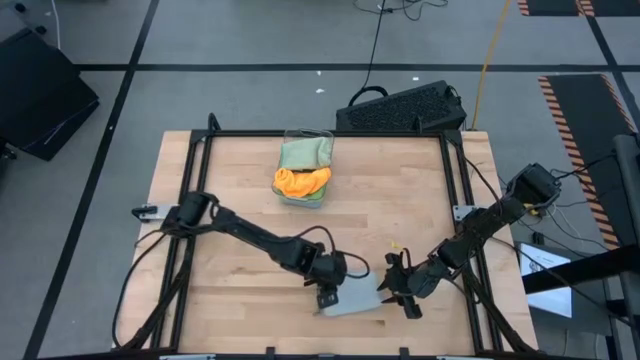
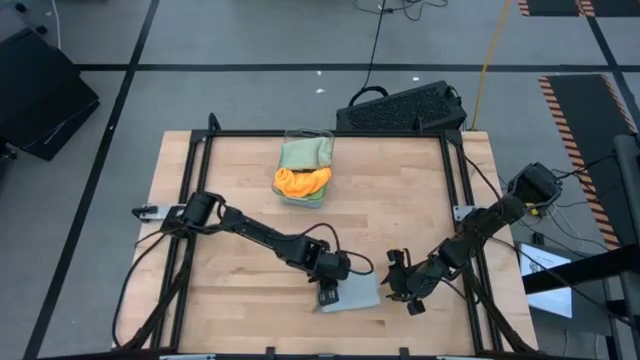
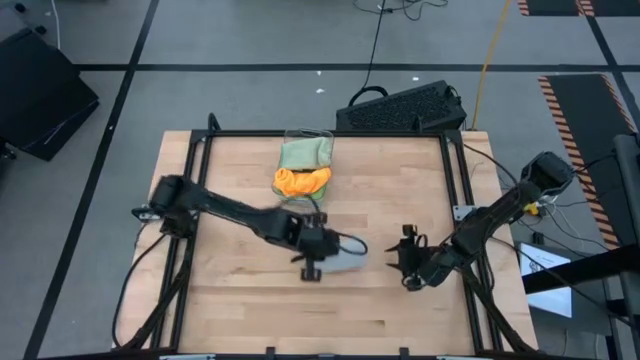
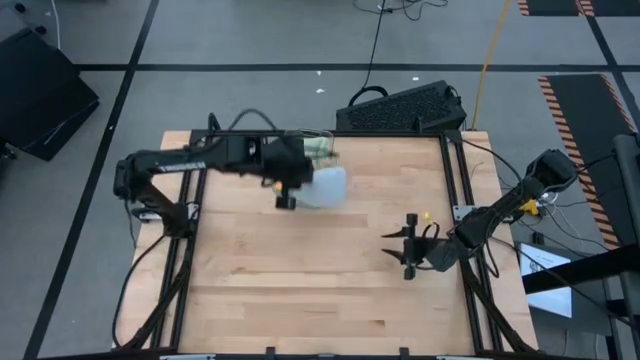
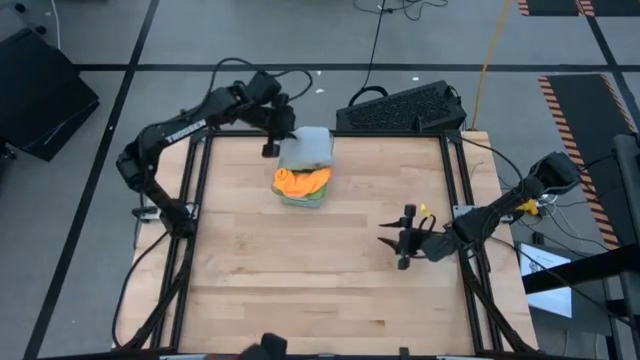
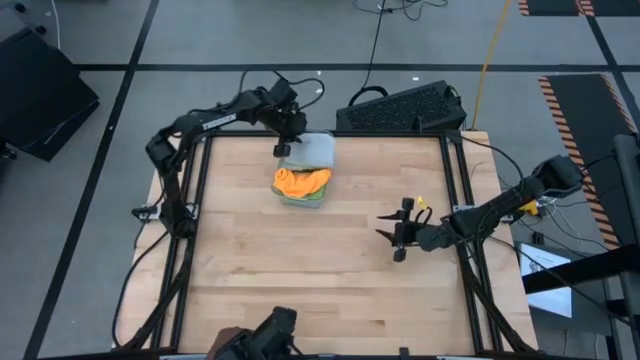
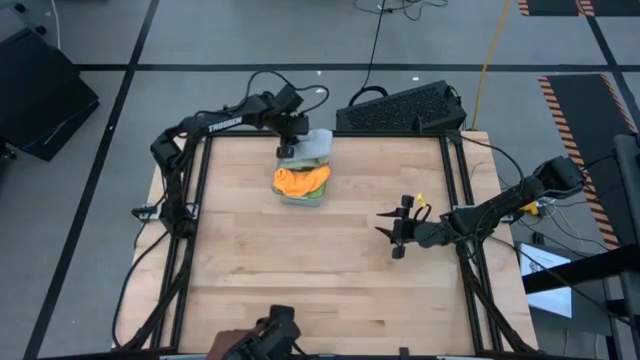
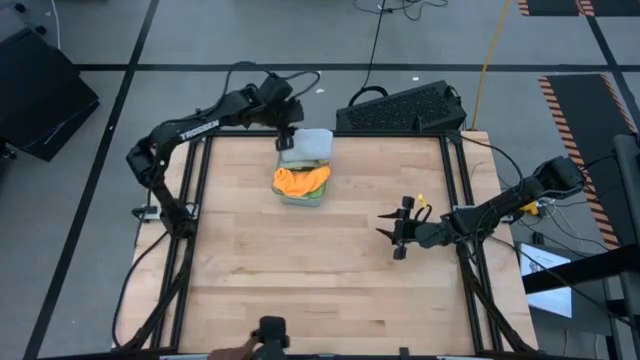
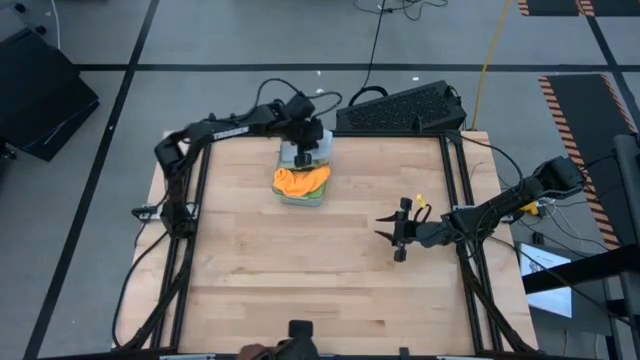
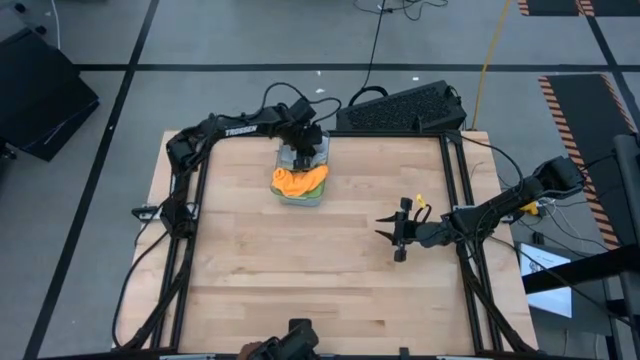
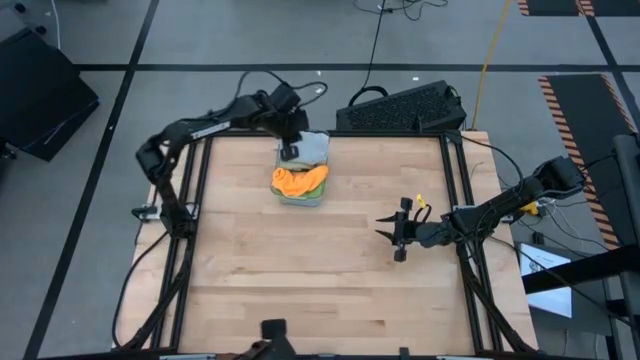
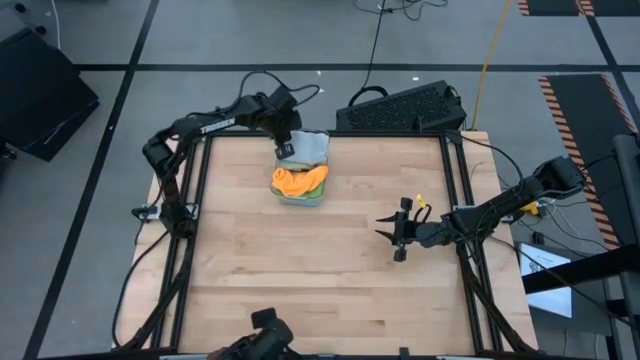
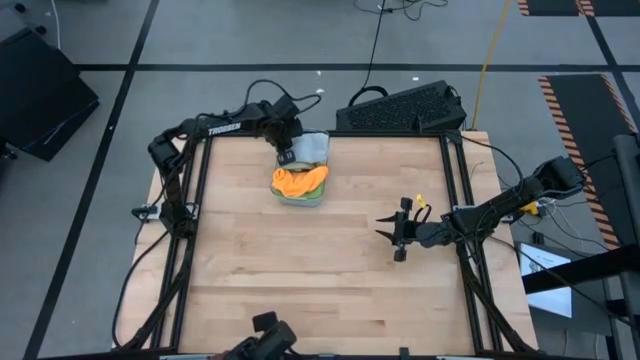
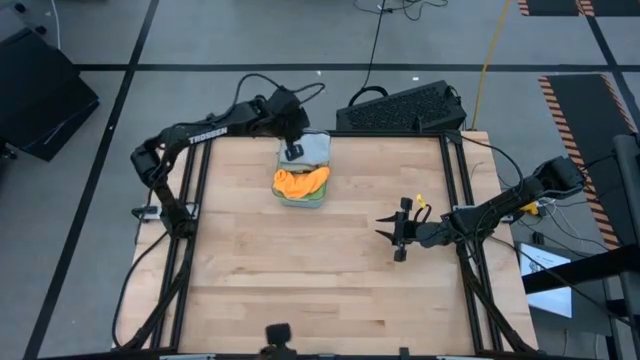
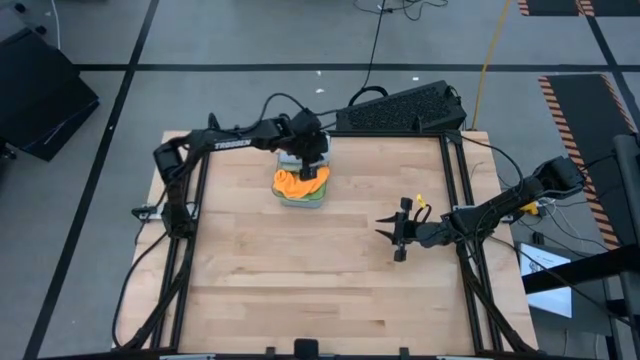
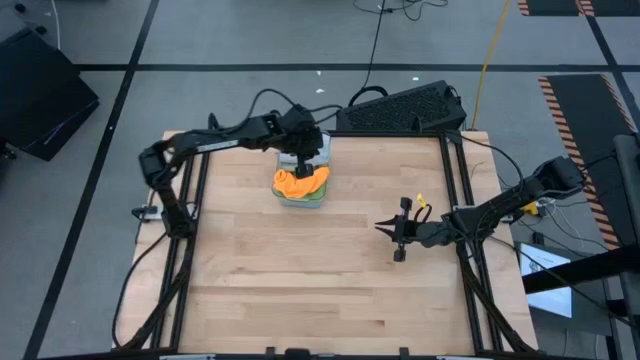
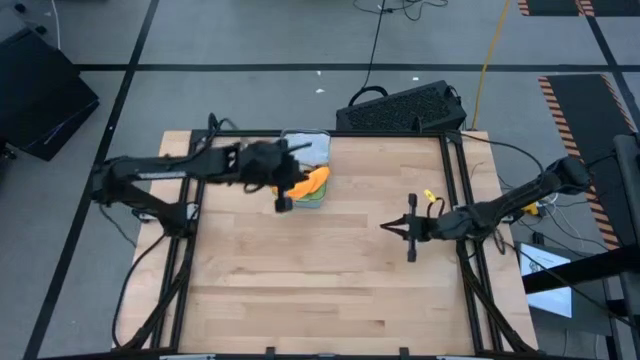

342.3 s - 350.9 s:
Task: Fold microfiber towels
Put the folded gray towel into the bin

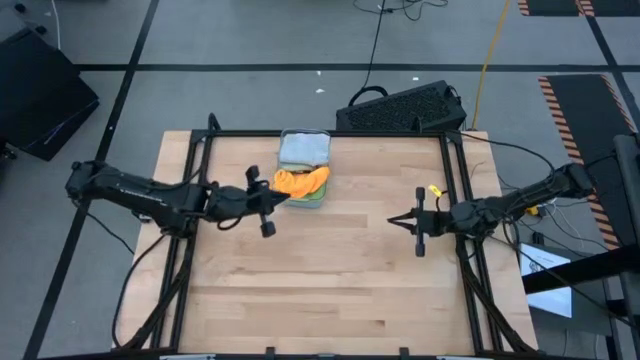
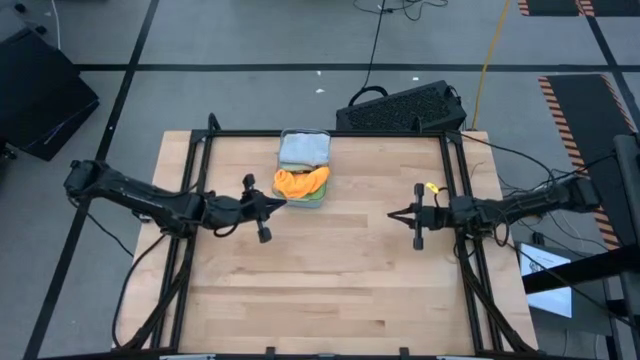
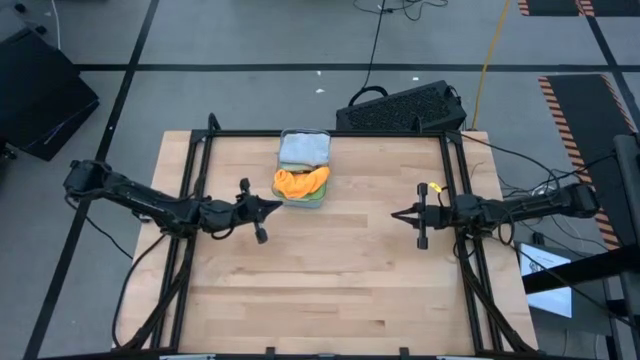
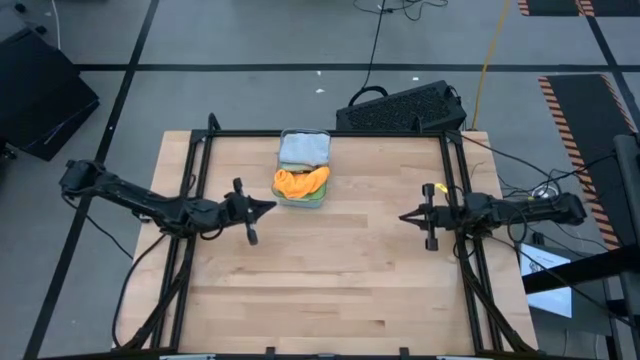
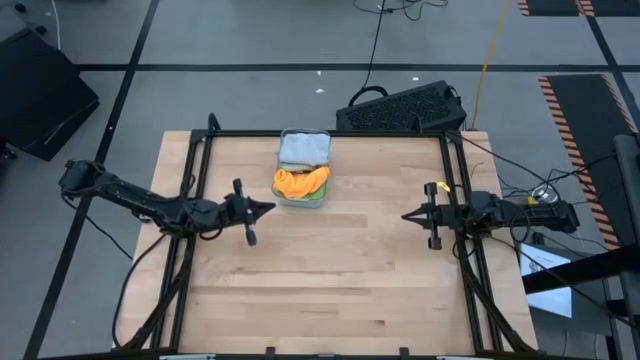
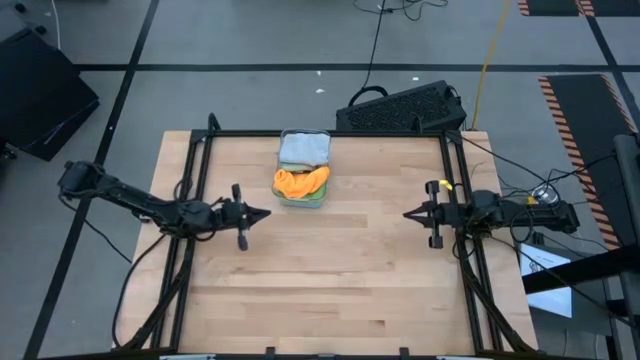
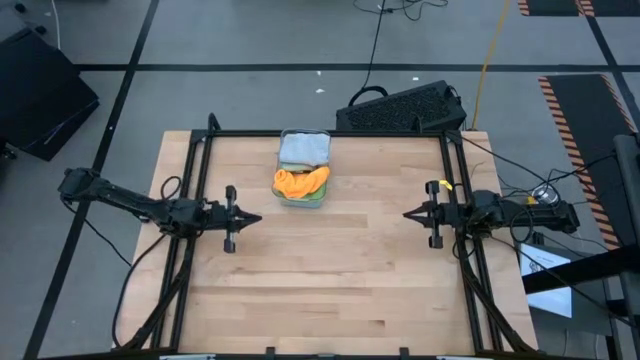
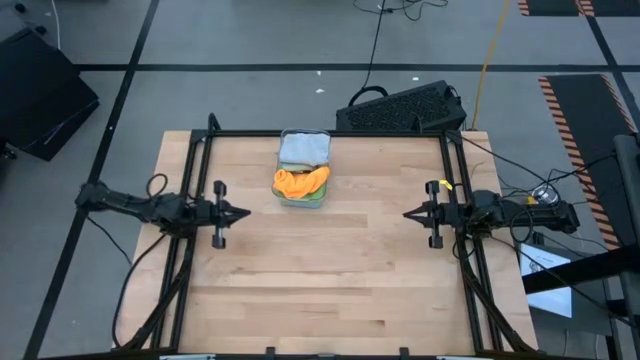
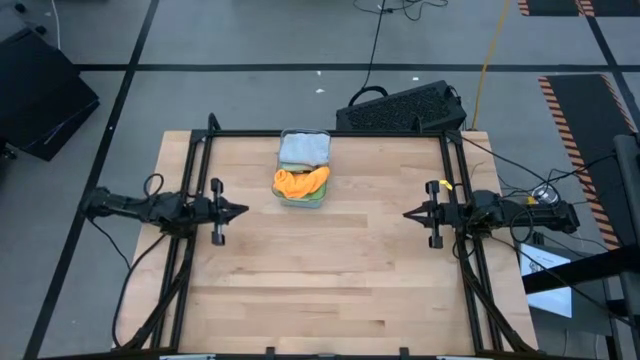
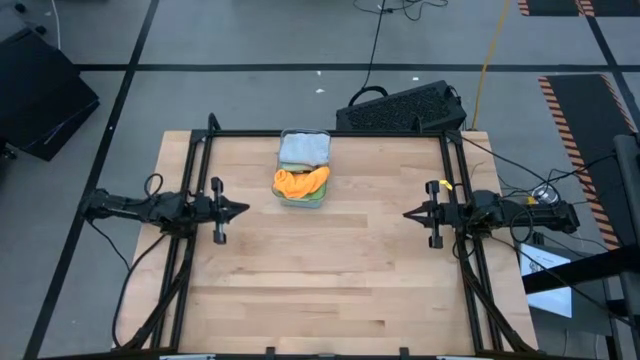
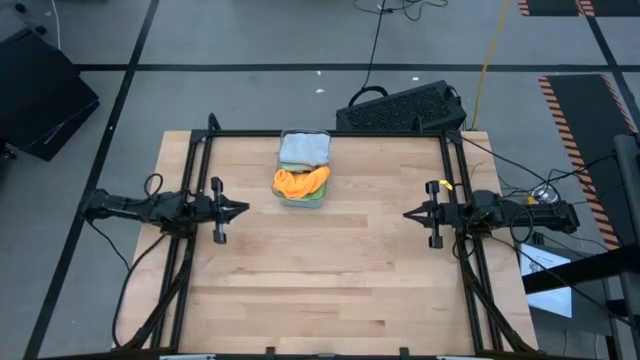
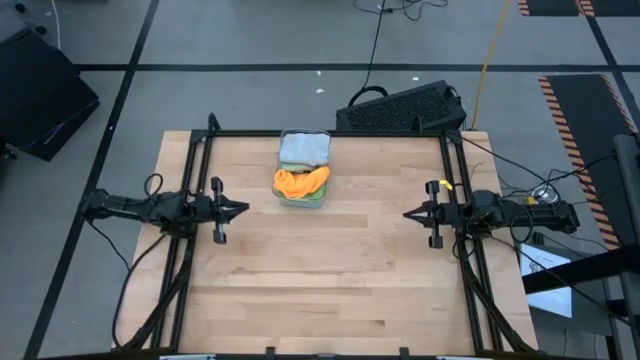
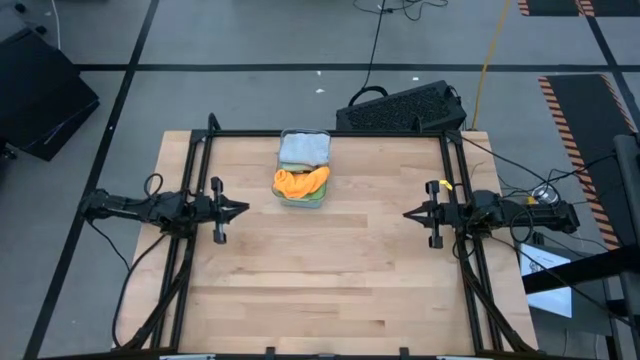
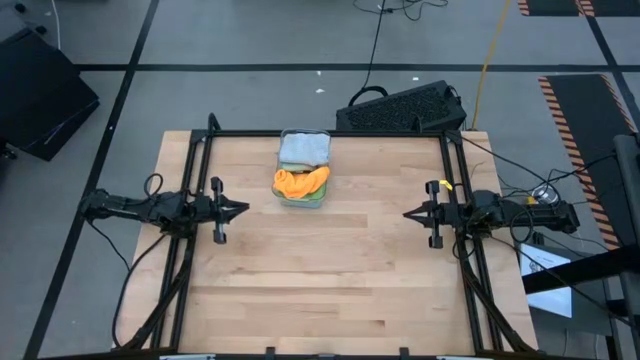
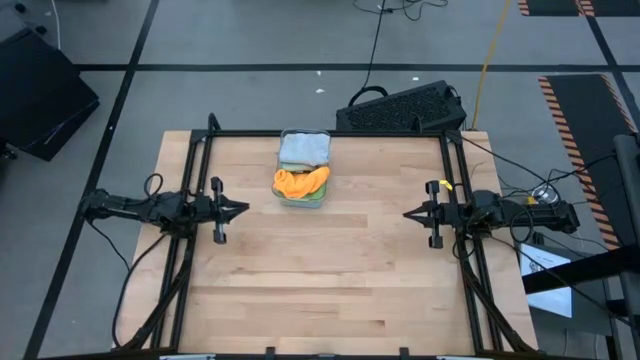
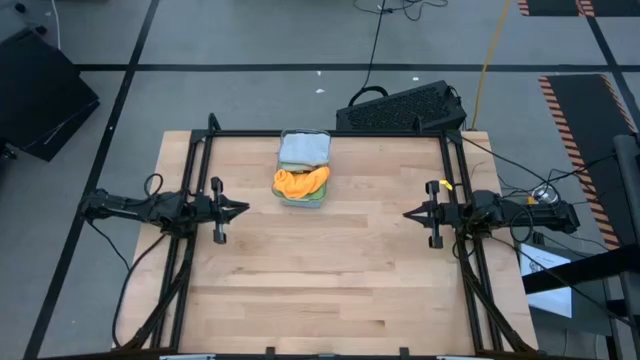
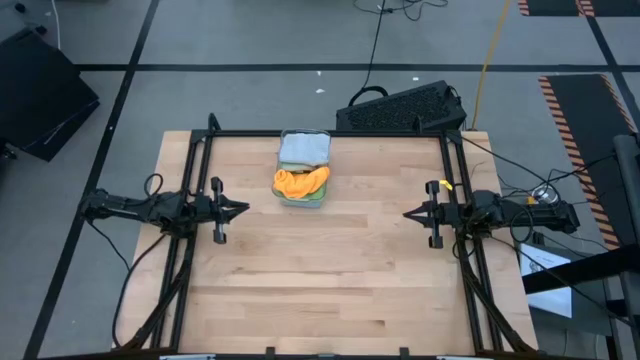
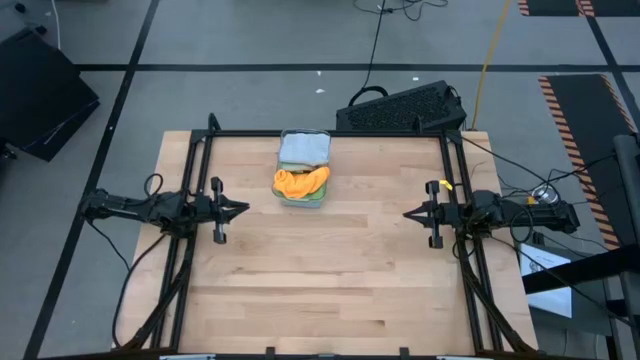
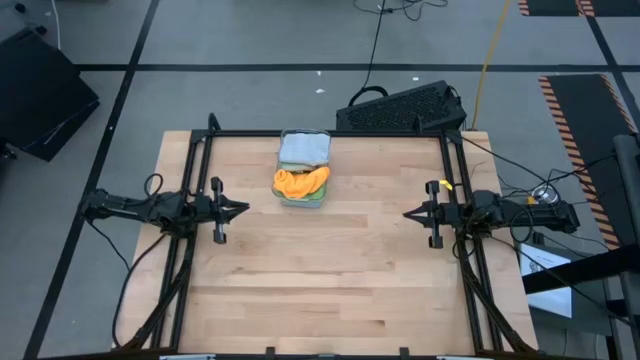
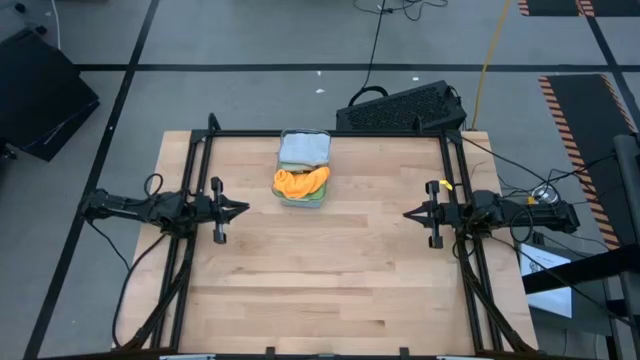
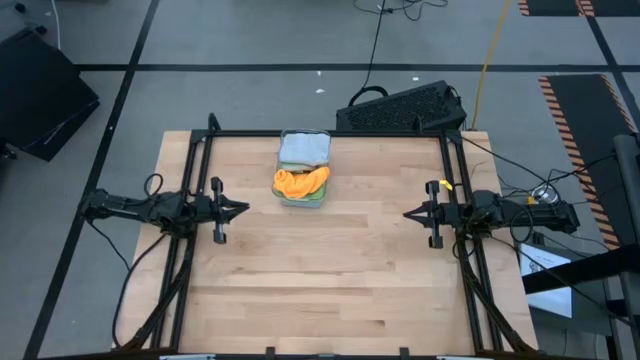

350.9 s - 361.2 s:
Return to Home Position
